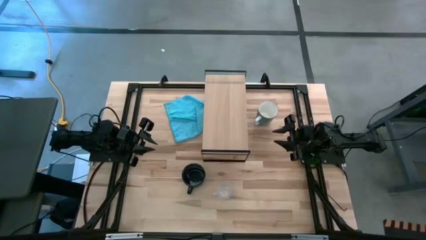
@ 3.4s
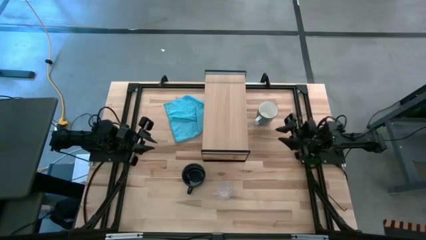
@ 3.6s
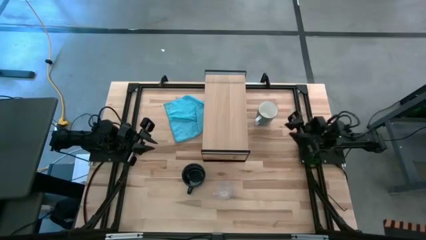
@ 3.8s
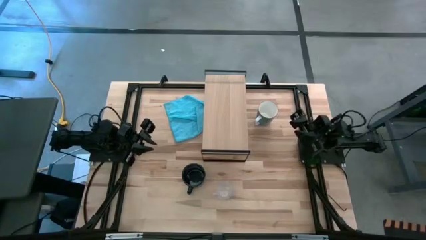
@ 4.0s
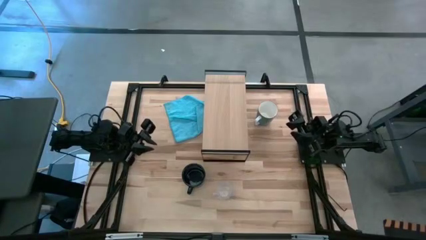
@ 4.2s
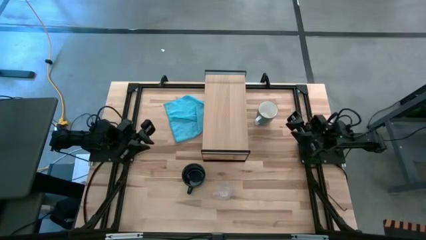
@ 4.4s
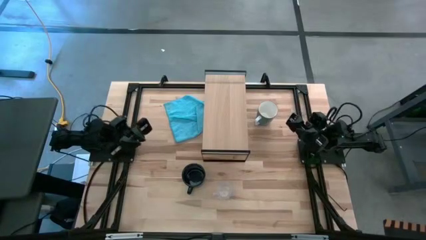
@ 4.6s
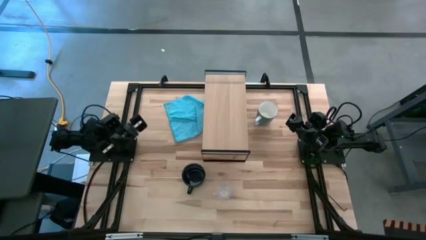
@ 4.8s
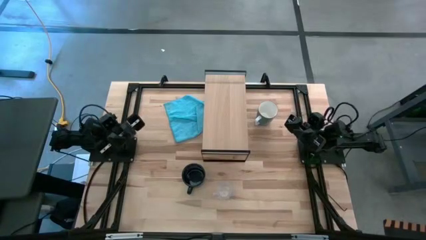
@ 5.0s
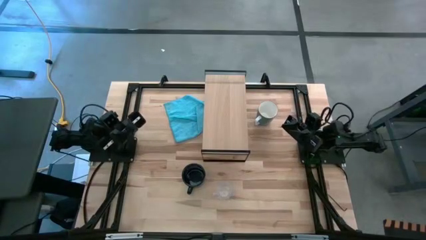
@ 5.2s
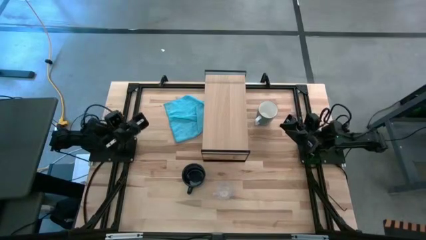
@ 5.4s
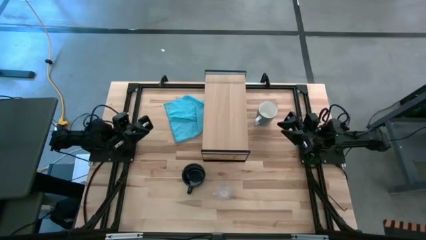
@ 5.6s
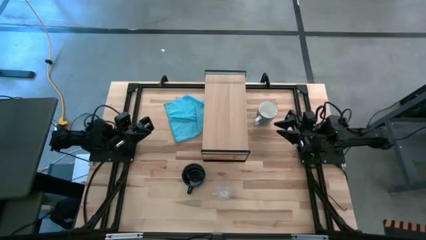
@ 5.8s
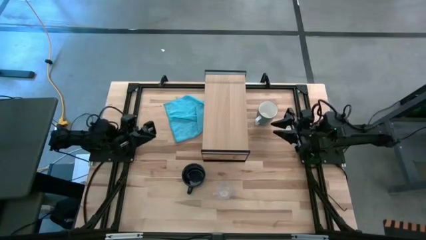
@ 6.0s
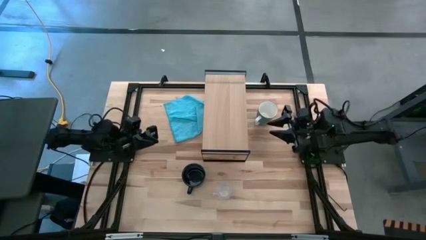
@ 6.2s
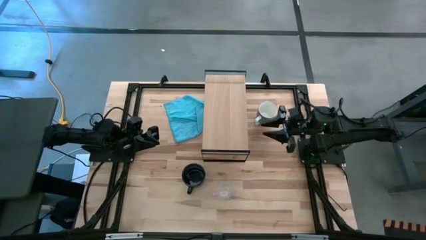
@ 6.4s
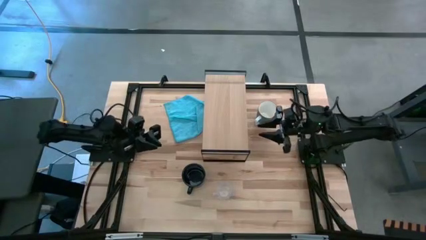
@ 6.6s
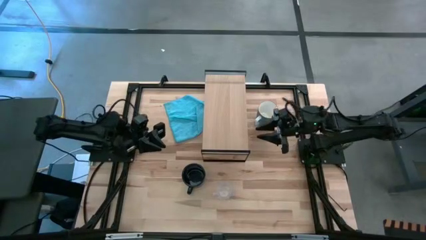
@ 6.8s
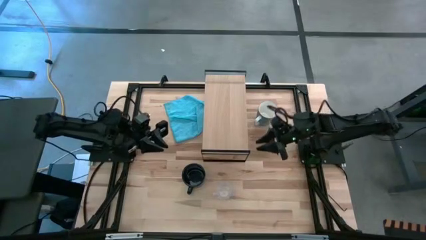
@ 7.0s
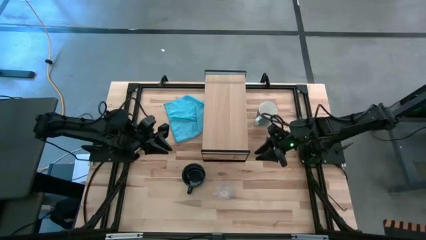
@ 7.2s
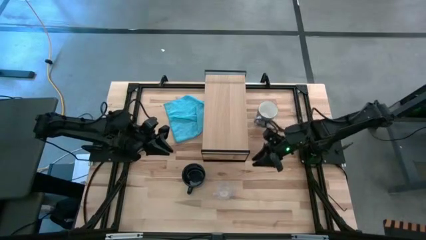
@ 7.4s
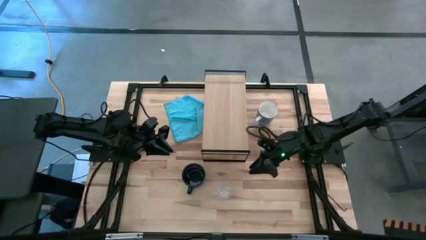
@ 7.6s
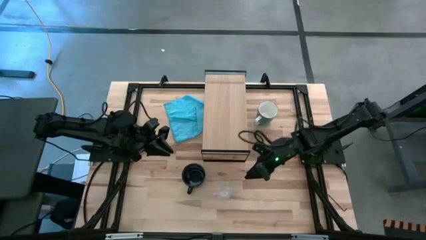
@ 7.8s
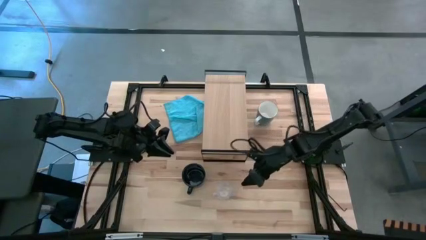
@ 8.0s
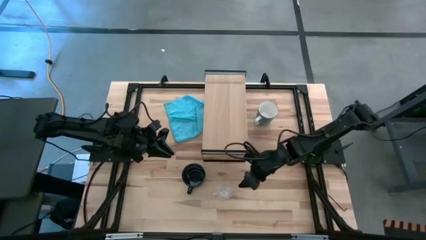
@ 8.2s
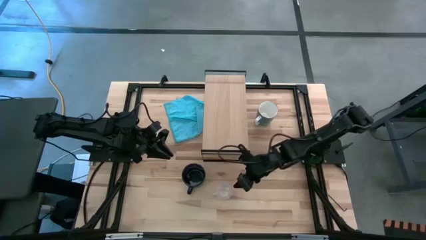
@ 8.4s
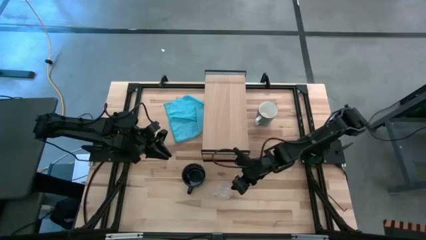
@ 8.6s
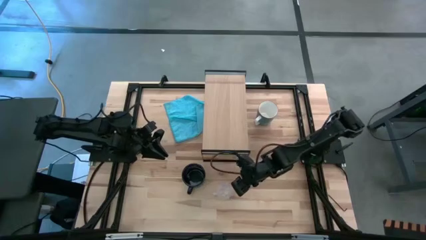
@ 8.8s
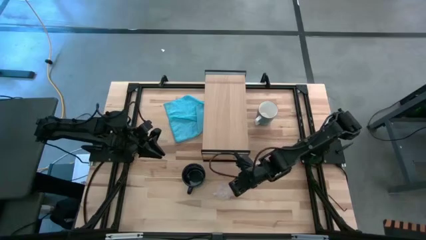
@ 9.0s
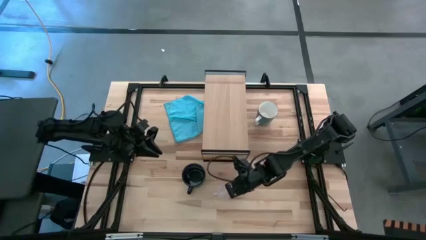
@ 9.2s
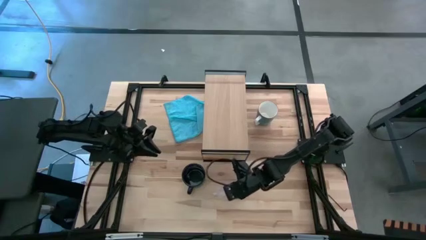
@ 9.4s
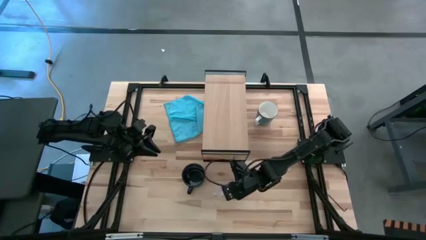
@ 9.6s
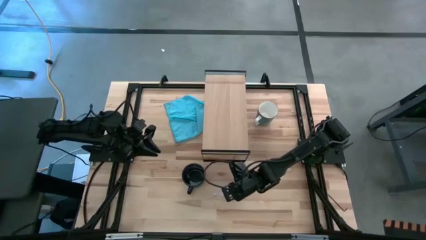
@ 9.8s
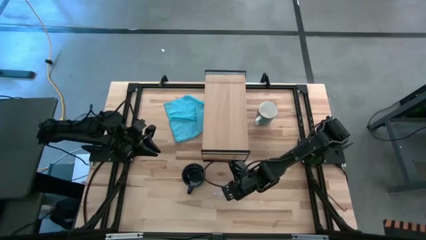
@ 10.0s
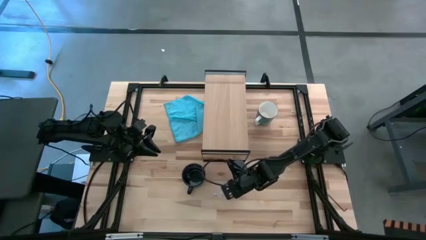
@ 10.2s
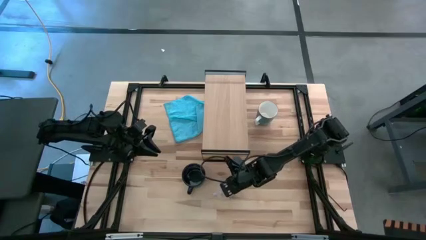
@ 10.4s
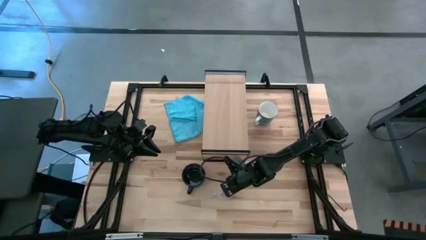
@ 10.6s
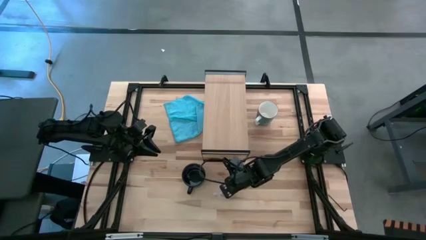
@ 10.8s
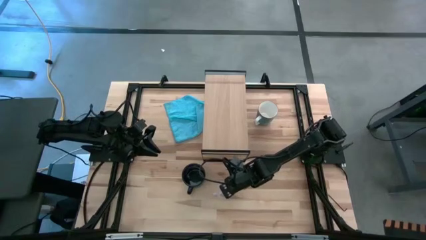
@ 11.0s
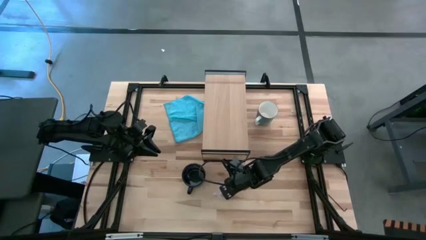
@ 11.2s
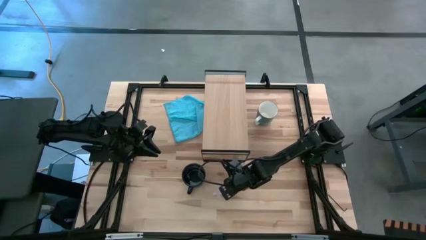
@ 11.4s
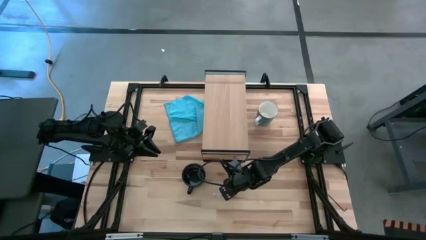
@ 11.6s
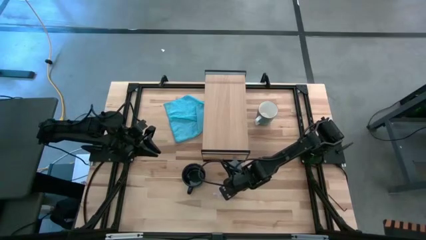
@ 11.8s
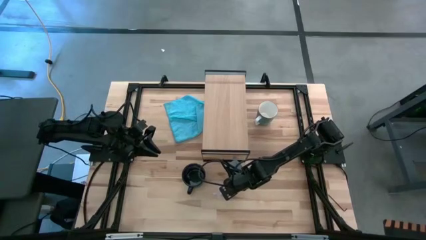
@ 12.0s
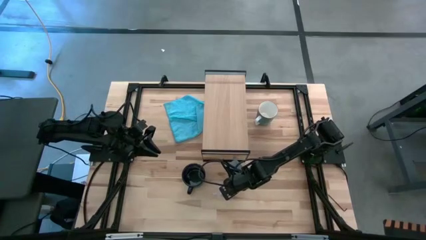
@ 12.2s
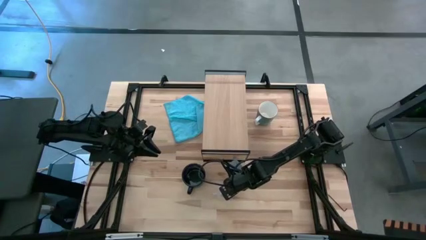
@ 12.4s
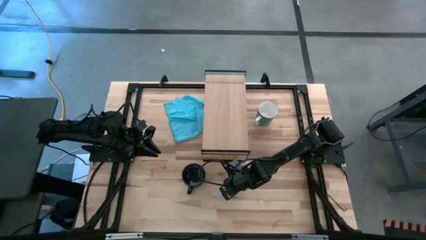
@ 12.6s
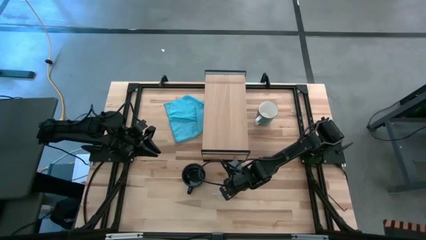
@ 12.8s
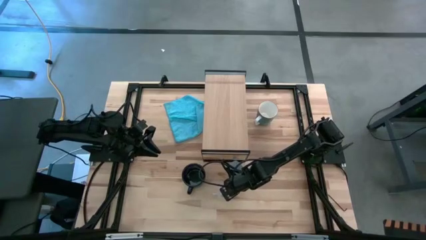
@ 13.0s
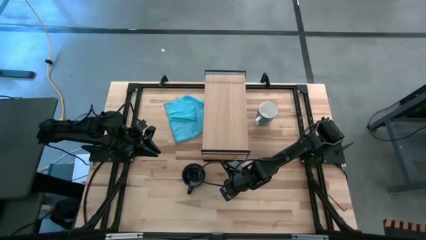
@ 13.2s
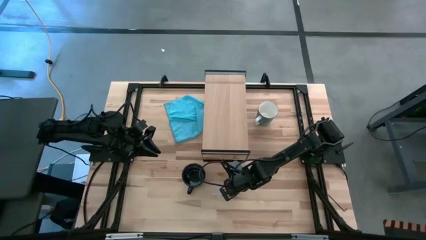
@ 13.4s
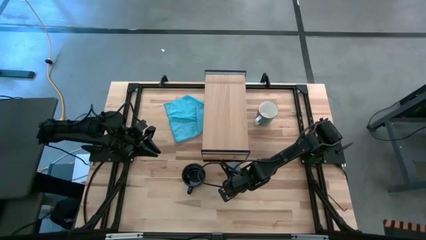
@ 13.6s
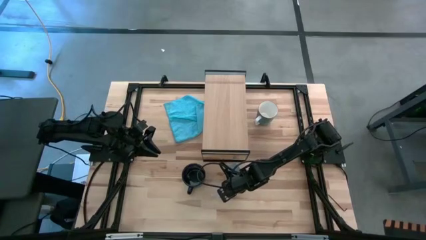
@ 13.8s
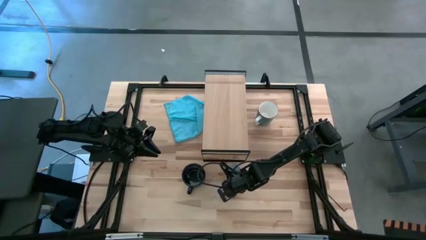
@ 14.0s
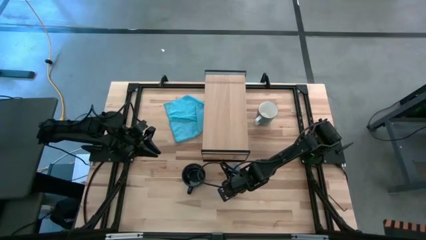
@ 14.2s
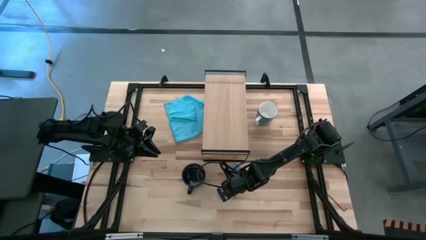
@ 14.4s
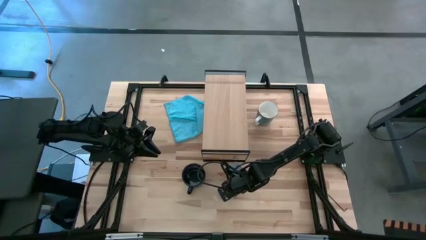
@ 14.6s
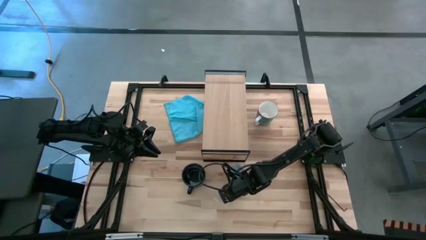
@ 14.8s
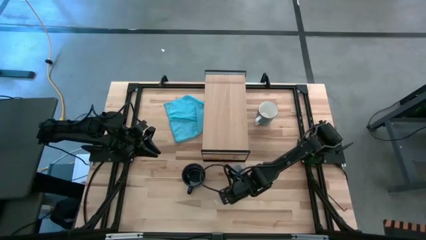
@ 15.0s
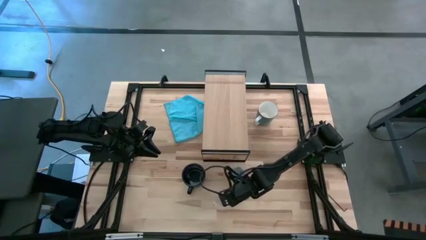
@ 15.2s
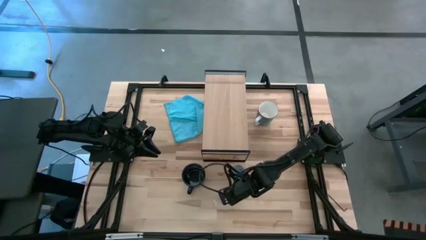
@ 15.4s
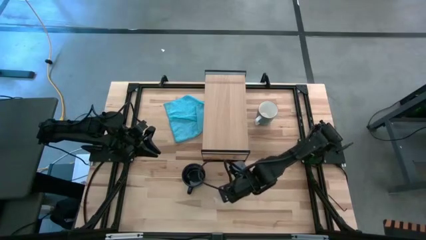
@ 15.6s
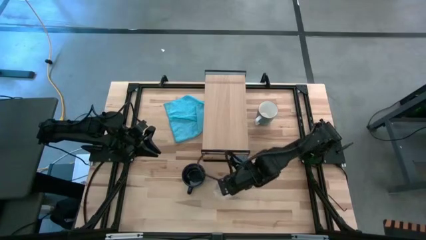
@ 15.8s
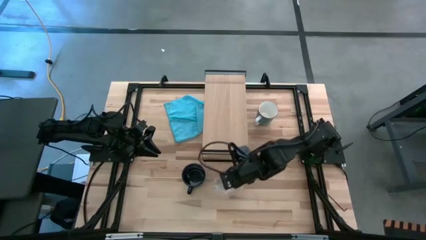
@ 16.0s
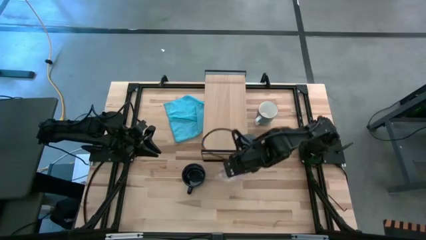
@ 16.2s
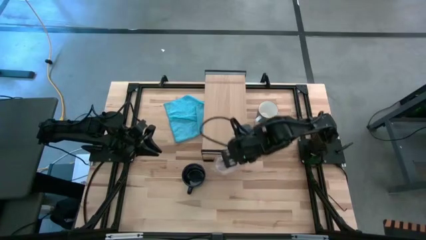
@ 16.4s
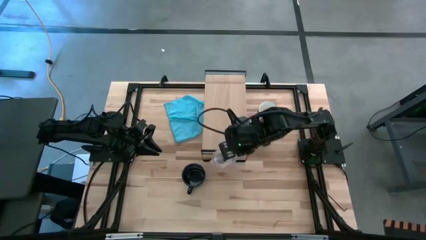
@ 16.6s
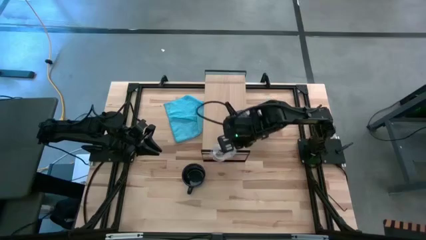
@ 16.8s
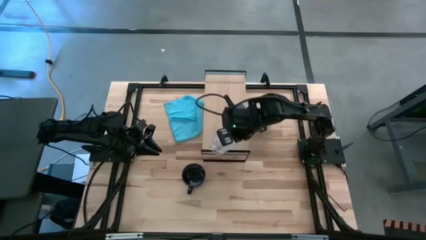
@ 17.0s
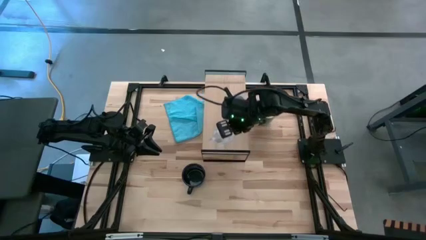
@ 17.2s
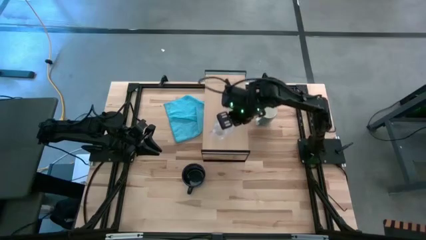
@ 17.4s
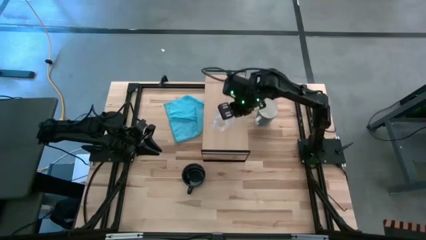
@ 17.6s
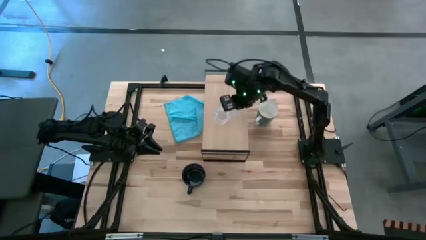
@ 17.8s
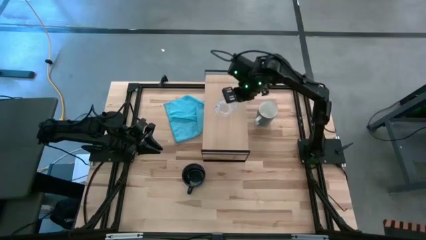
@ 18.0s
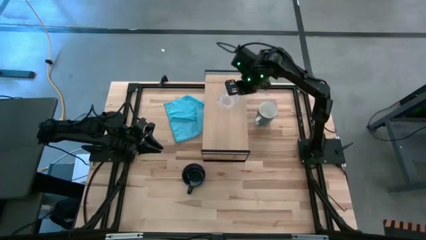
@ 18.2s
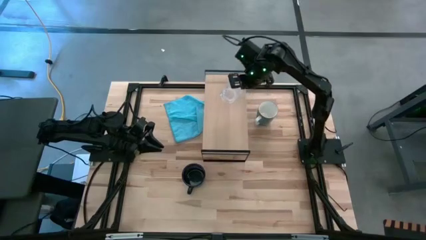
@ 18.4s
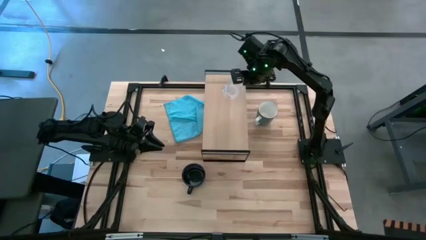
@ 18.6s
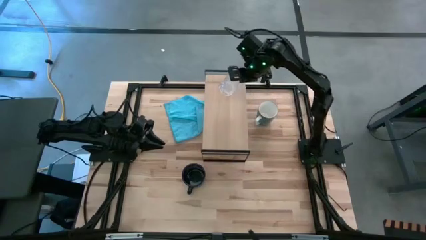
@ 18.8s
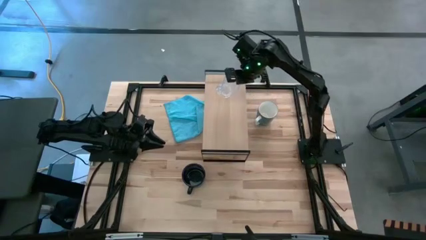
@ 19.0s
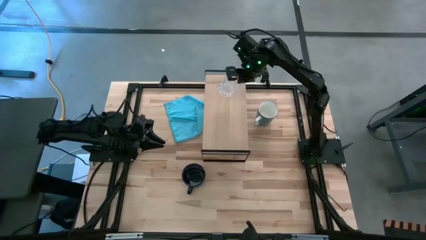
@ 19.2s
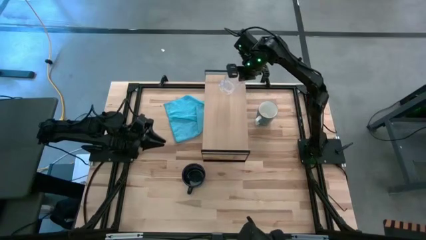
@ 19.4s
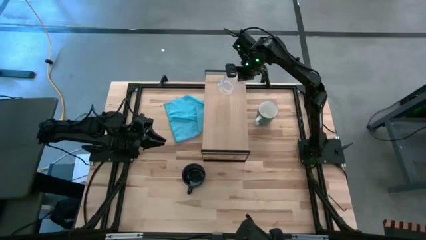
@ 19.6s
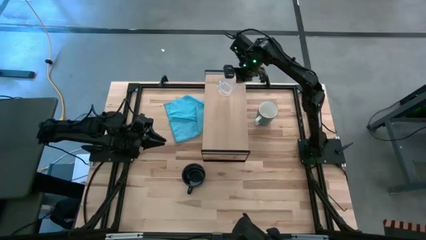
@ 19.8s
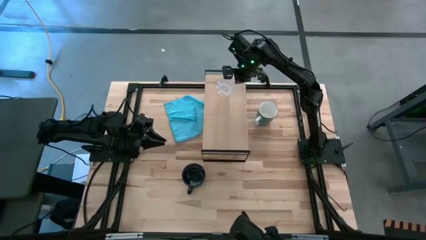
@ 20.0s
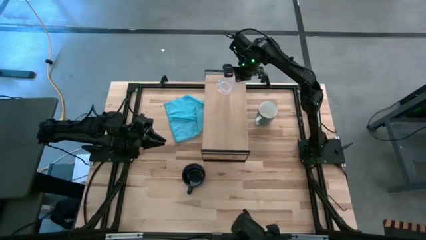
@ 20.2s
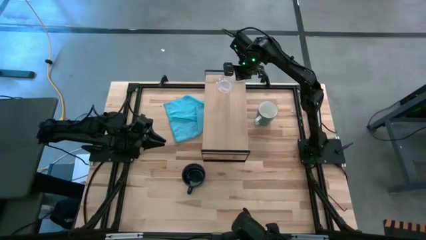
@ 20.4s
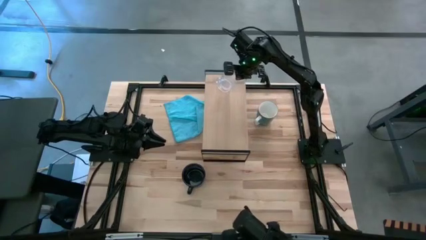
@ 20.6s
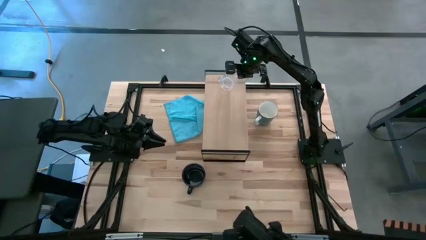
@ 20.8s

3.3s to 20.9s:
Task: Stack small to large cups/mugs on shelf
Put the transparent mug on the shelf
